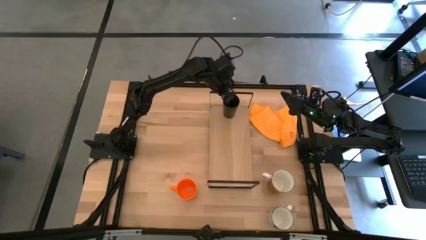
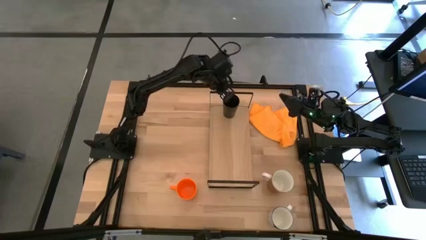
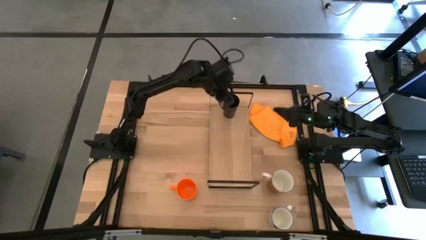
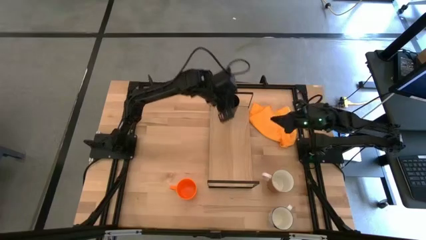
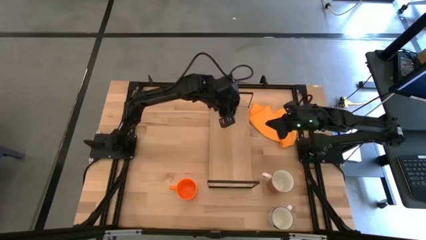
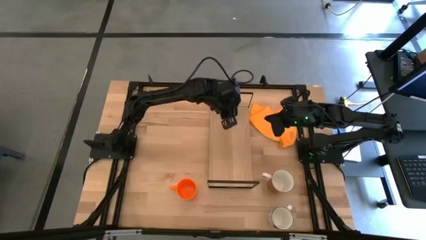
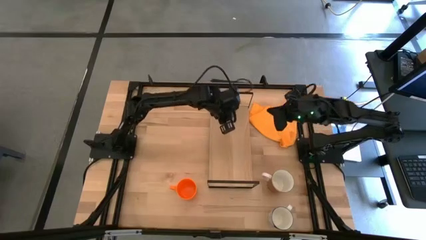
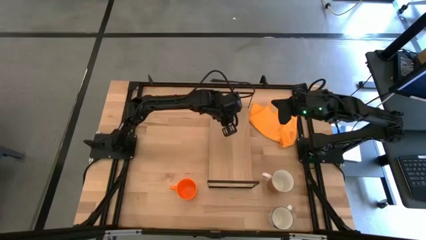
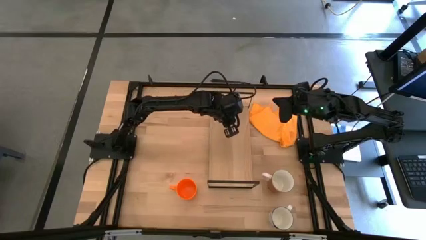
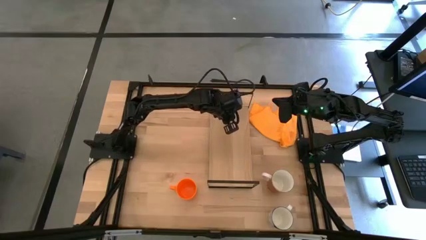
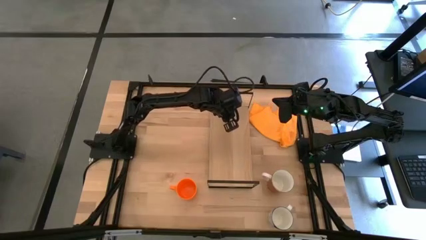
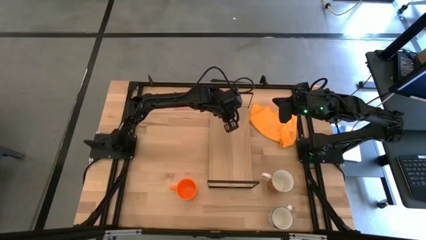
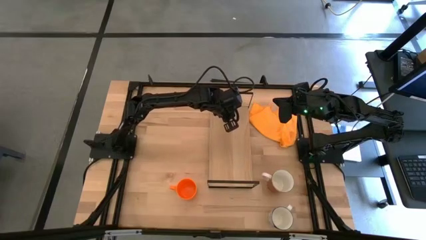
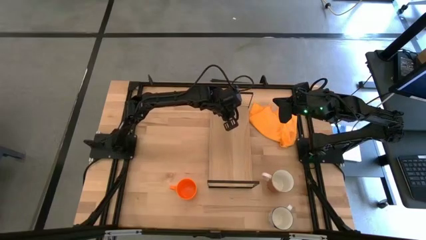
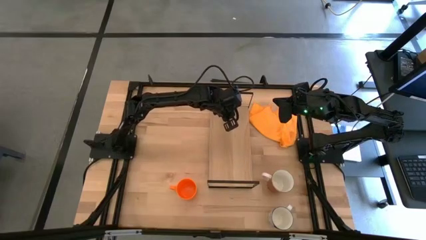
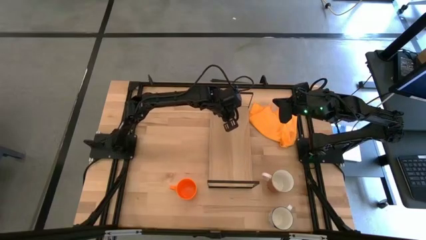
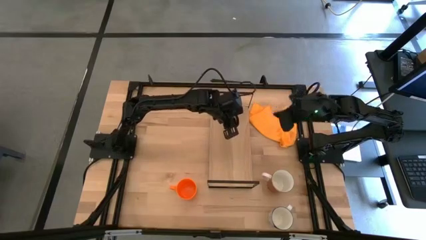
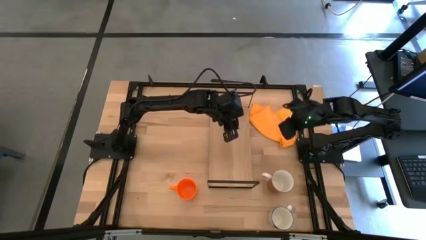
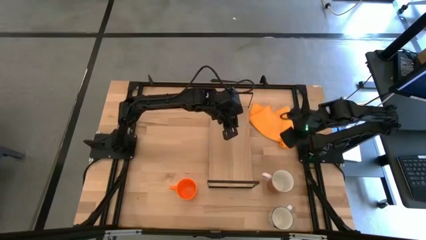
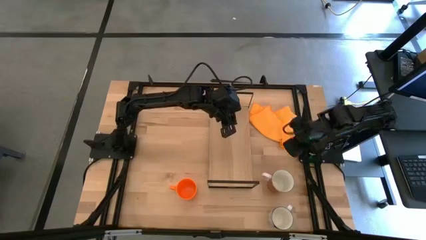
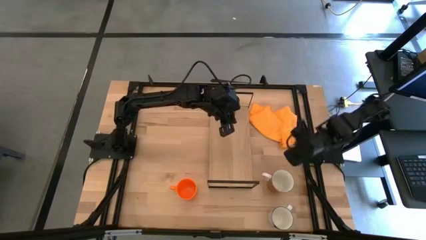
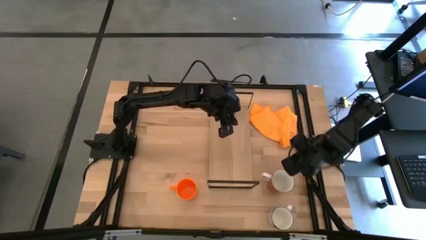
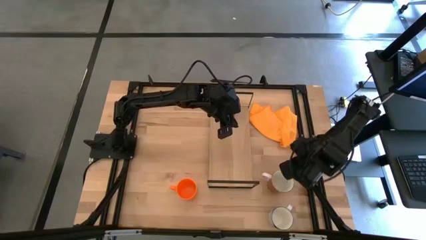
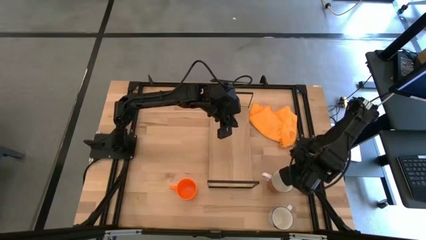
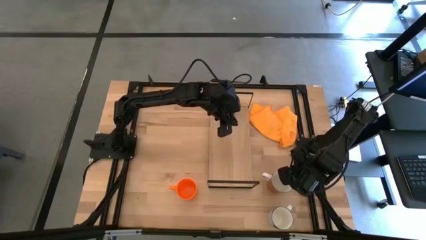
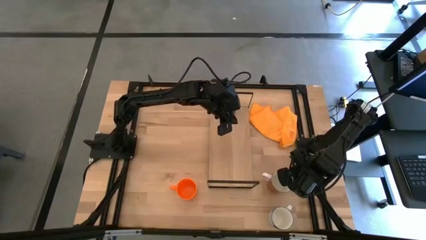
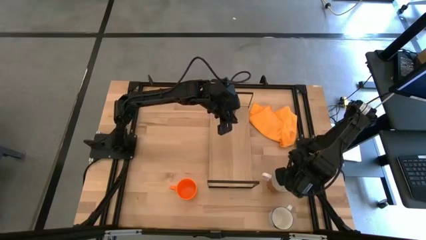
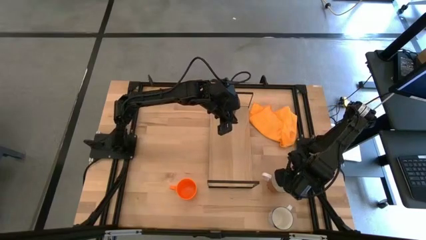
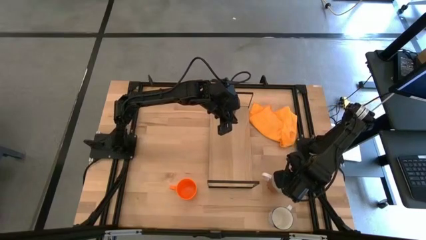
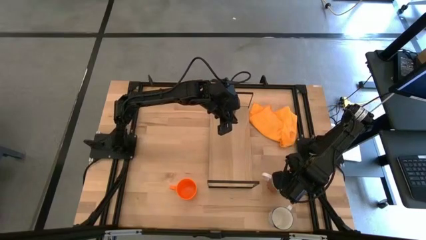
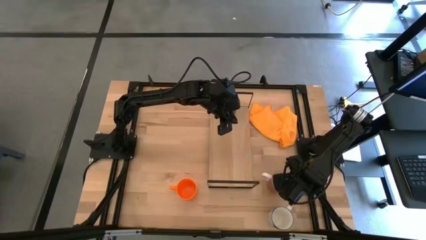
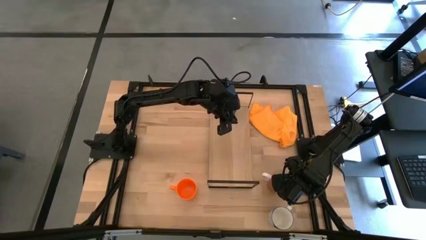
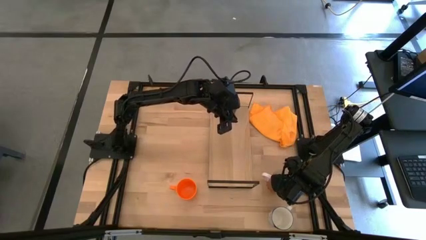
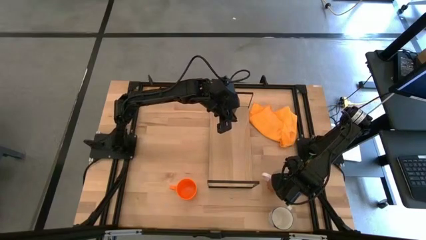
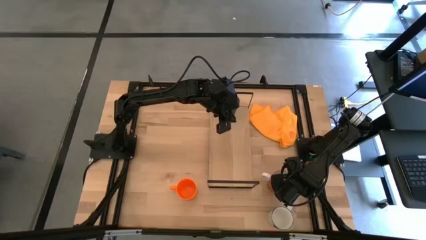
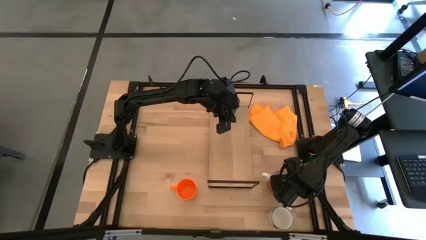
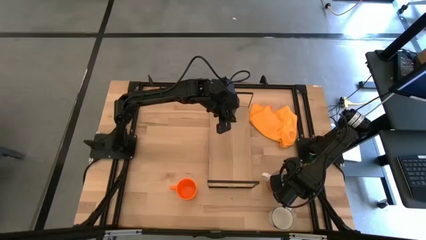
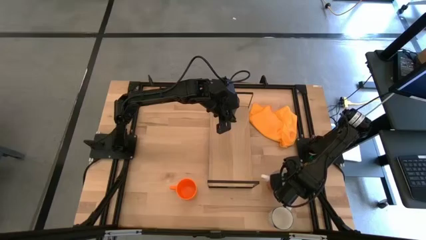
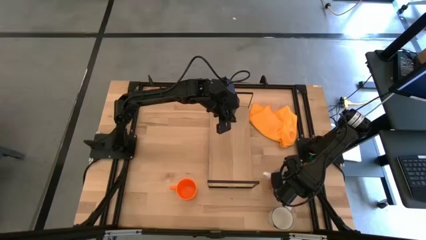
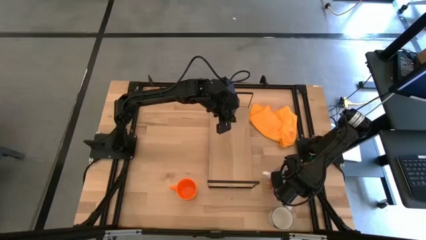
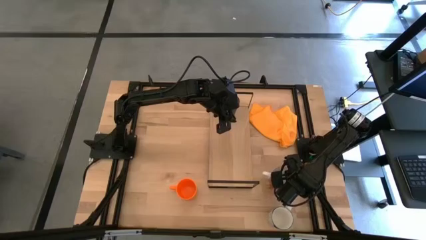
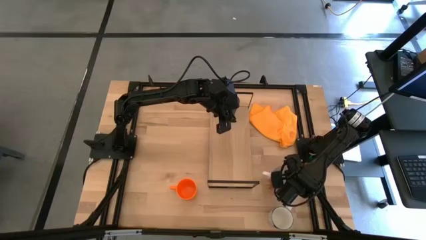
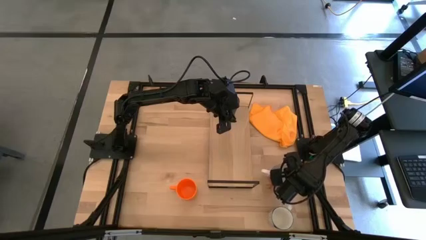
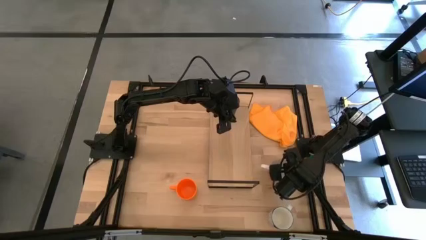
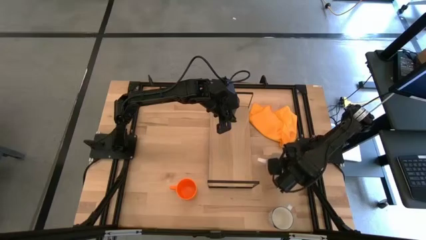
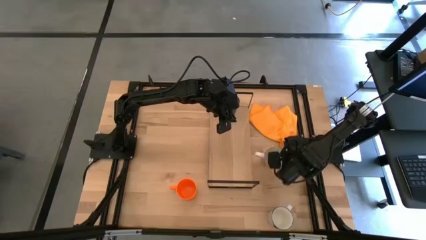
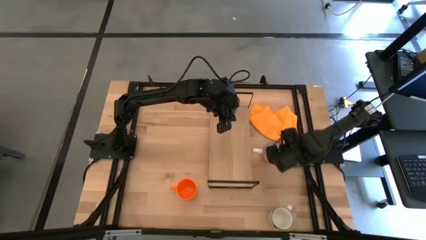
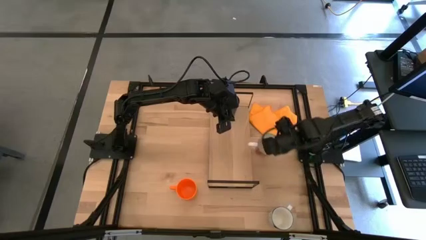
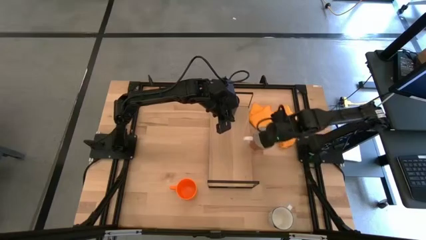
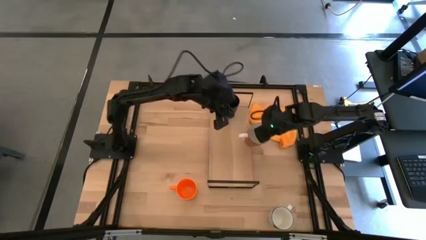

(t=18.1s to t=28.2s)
Task: Stack small to large cups/mugs on shelf
Put the red pattern mug align with the black cup on the shelf

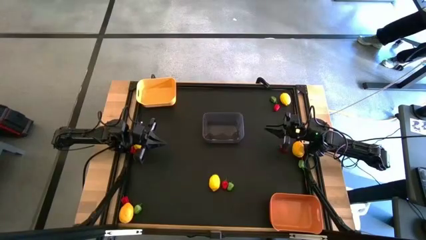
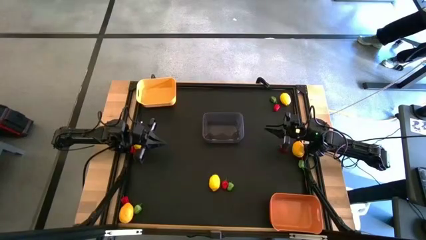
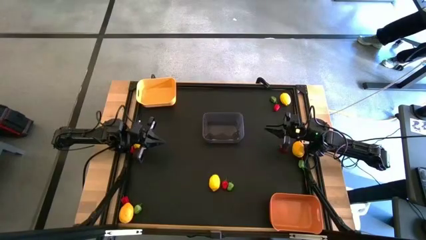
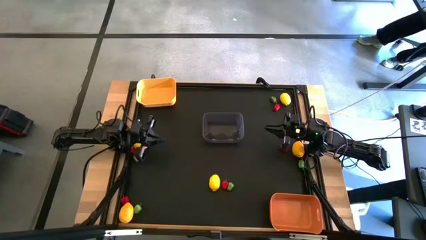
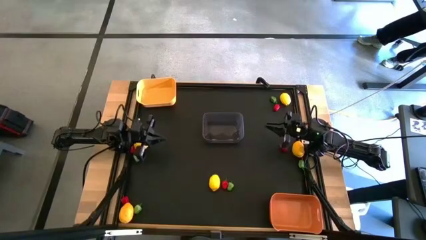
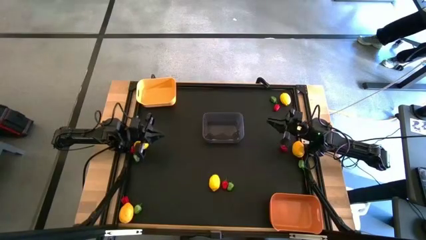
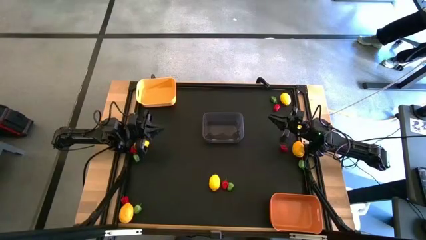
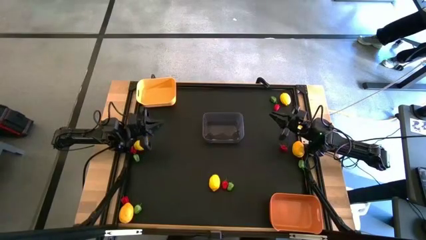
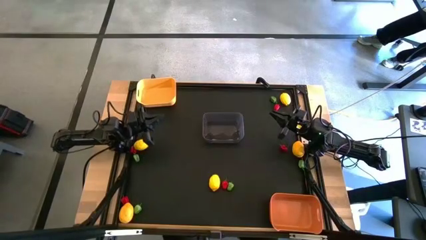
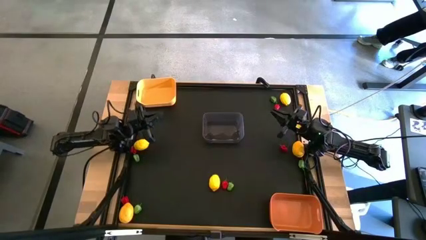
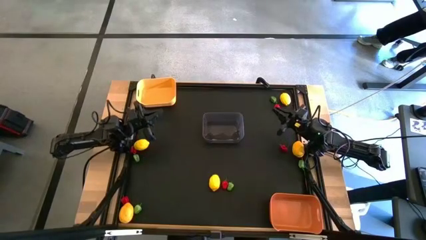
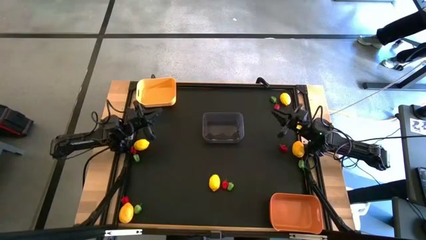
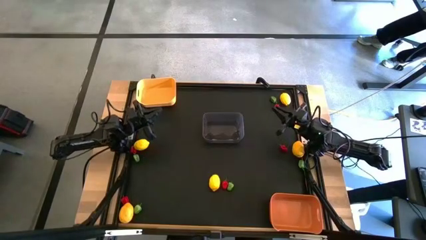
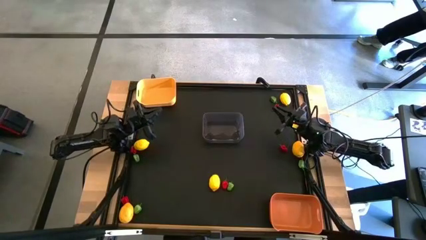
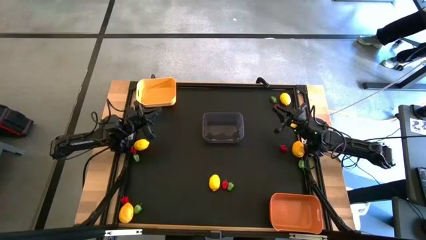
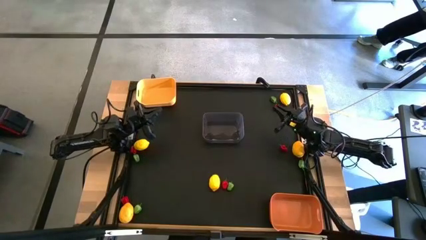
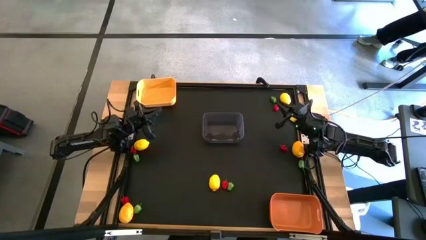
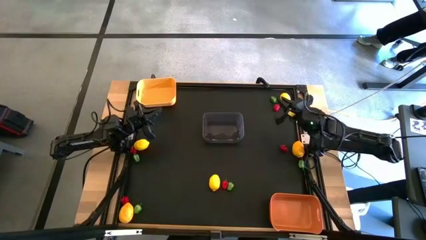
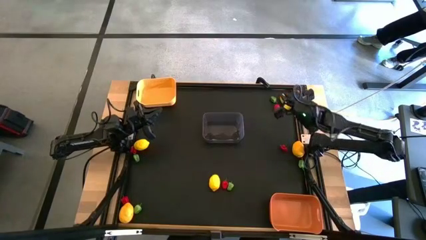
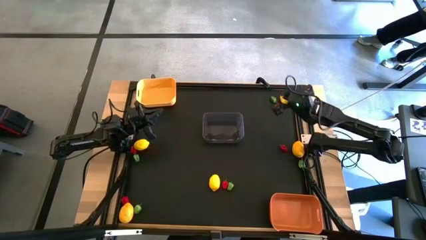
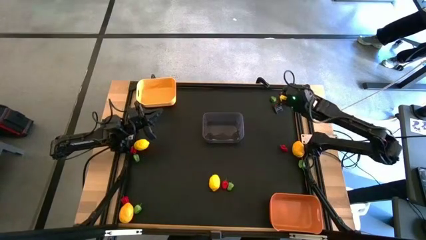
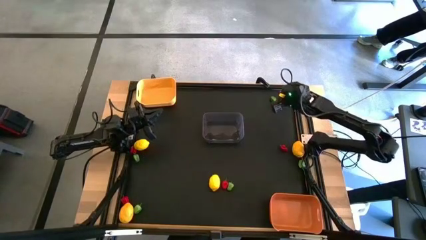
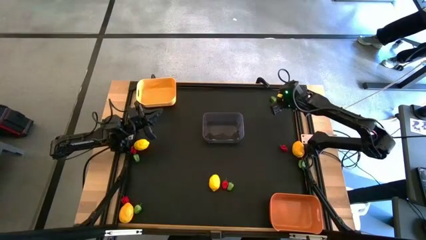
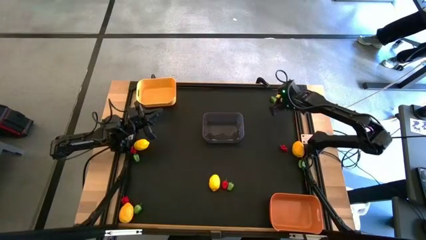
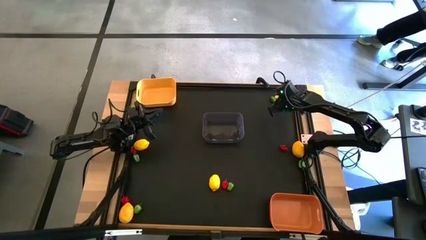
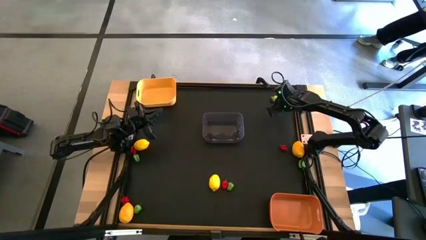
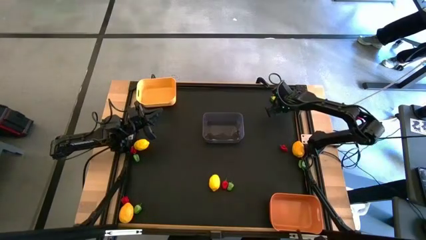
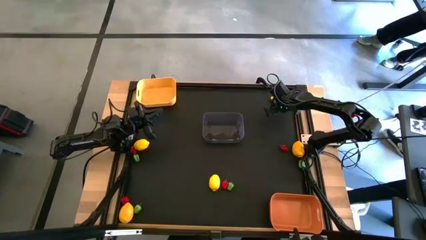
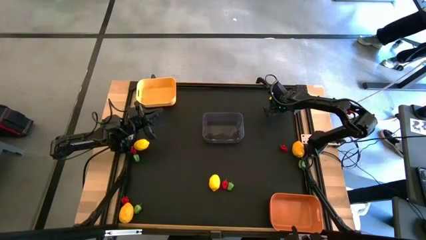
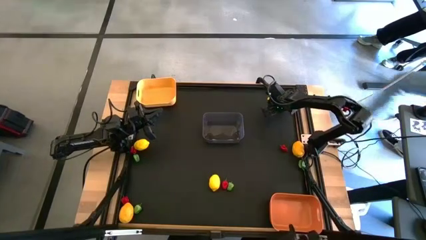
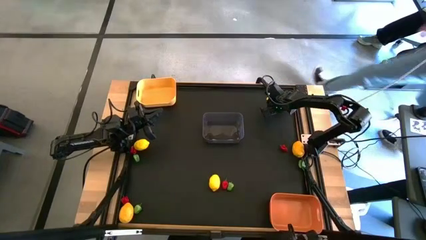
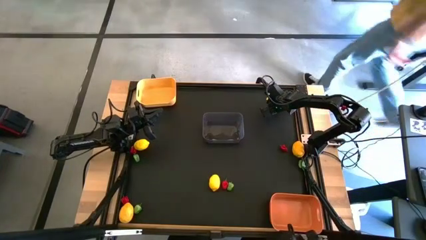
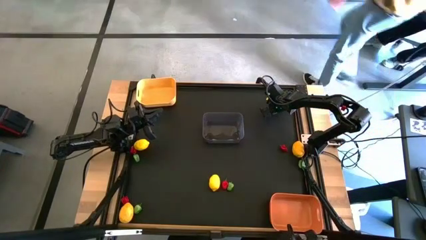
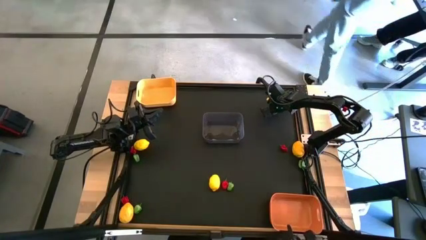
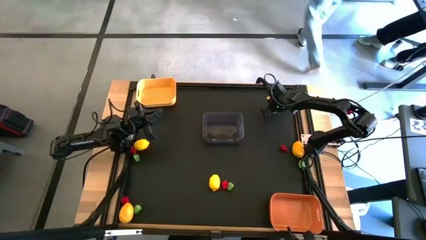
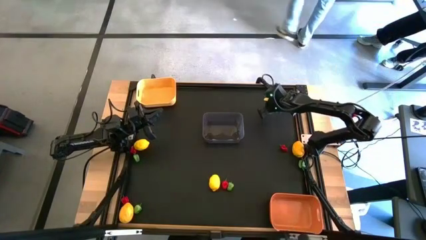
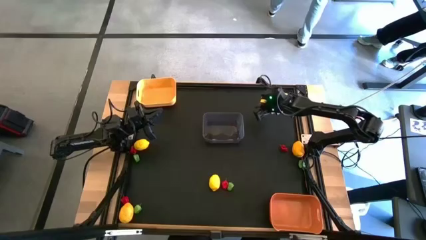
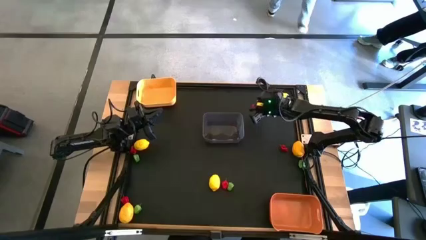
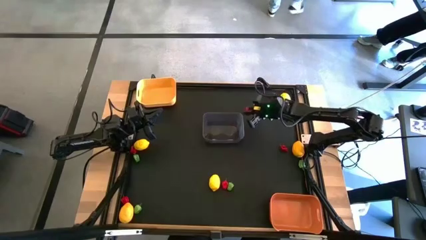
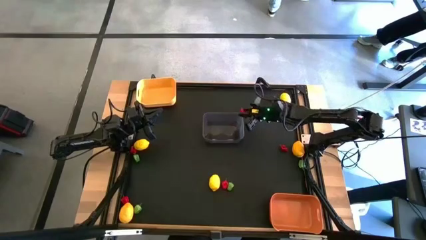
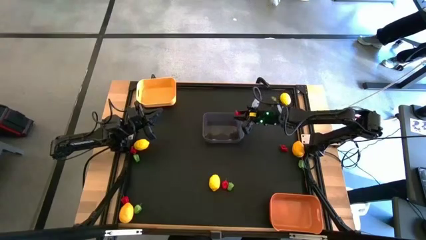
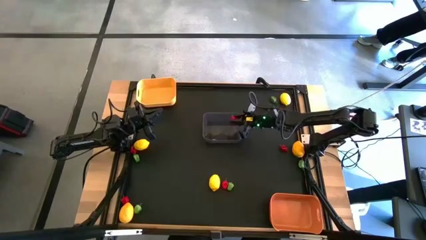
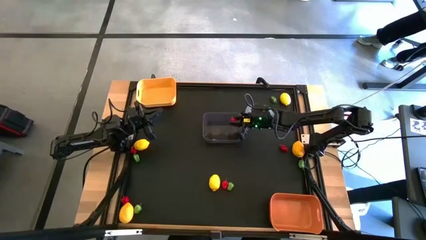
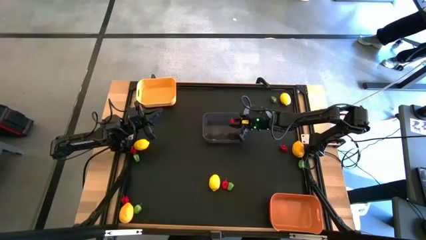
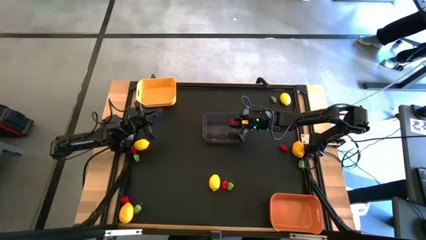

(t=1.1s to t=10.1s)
Task: Sort produce into baskets
Put the red bell pepper into the transparent bin
